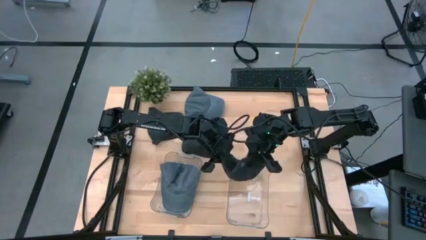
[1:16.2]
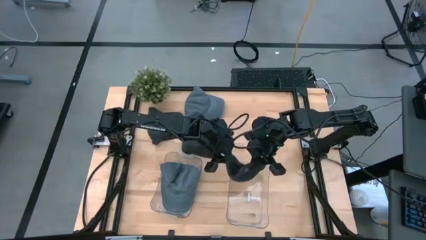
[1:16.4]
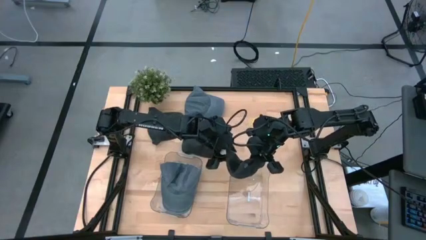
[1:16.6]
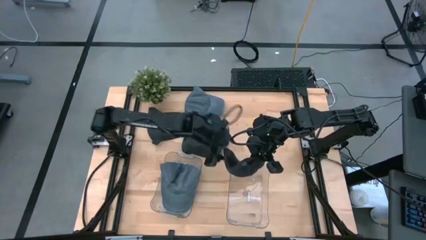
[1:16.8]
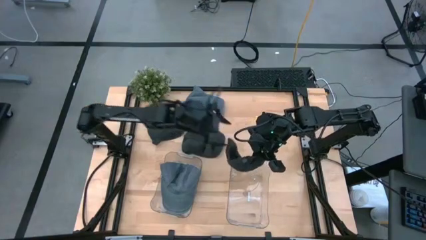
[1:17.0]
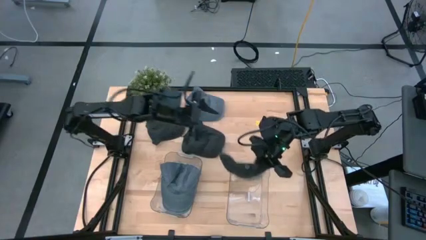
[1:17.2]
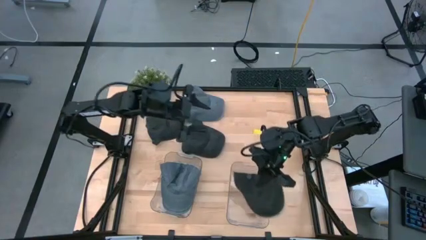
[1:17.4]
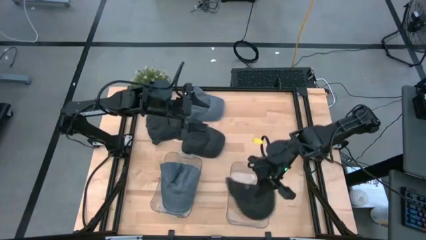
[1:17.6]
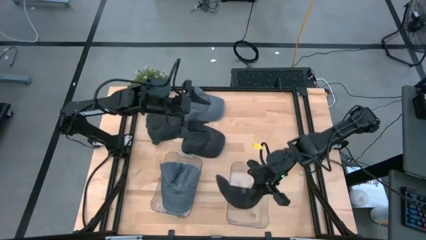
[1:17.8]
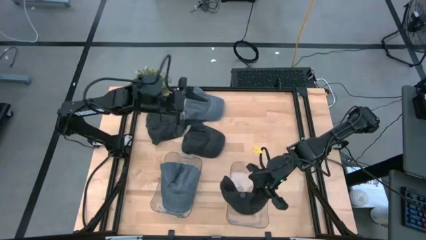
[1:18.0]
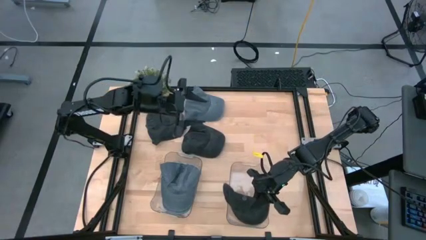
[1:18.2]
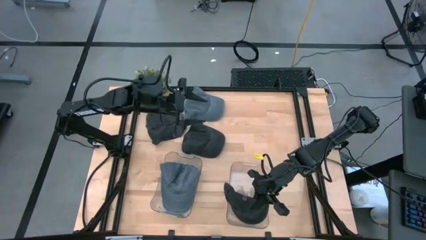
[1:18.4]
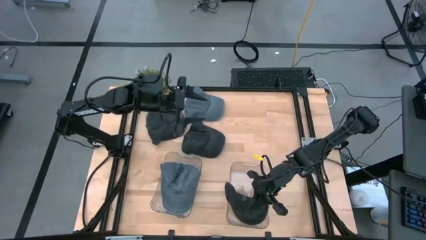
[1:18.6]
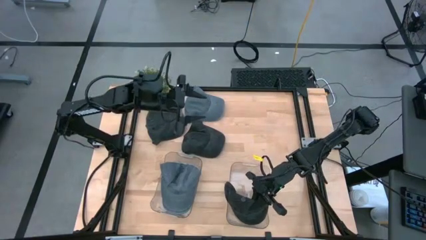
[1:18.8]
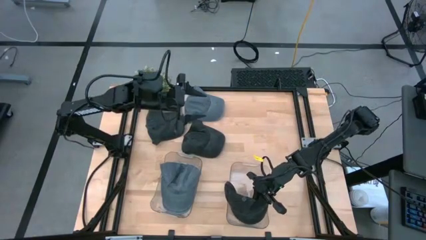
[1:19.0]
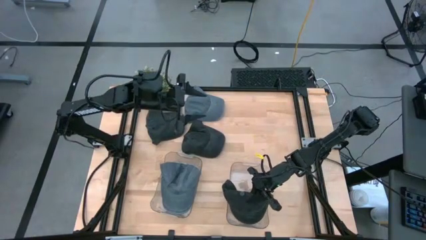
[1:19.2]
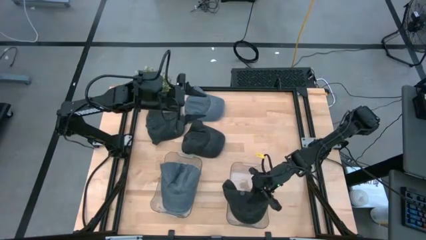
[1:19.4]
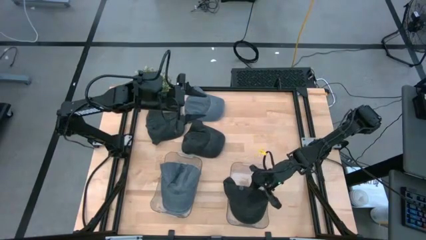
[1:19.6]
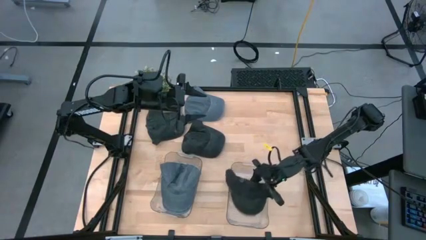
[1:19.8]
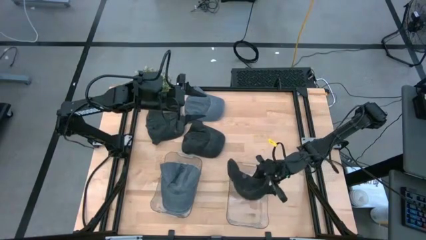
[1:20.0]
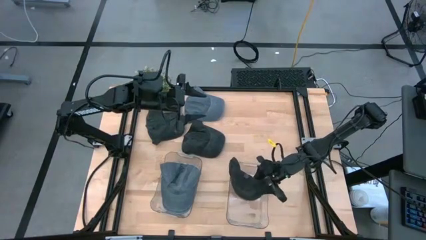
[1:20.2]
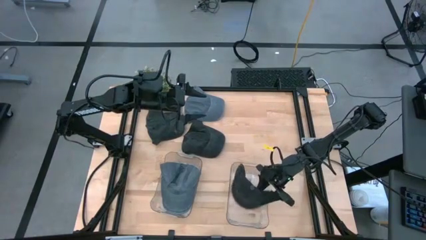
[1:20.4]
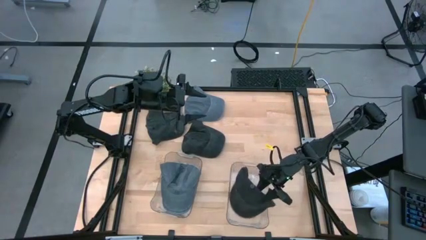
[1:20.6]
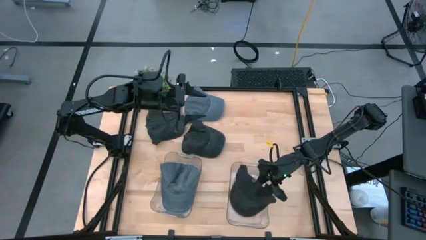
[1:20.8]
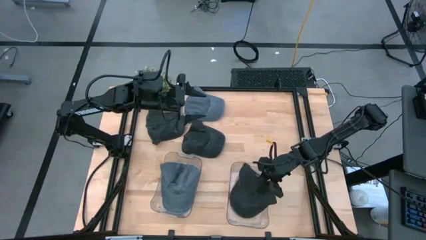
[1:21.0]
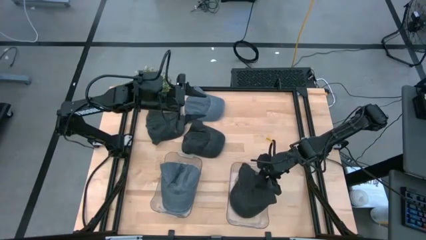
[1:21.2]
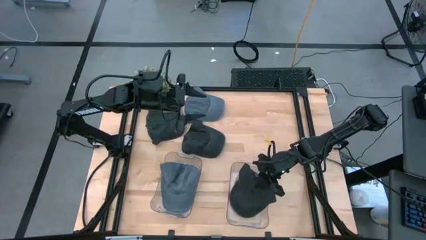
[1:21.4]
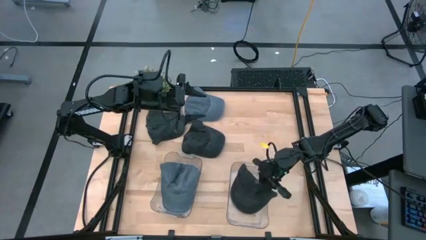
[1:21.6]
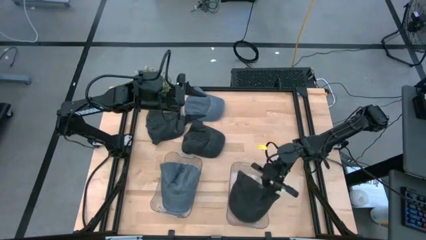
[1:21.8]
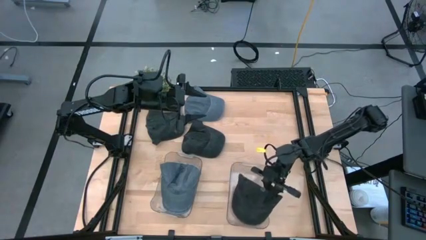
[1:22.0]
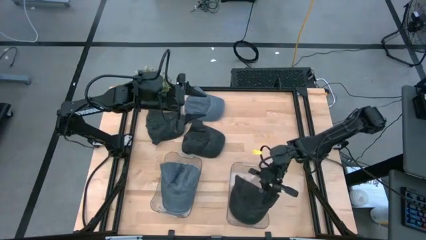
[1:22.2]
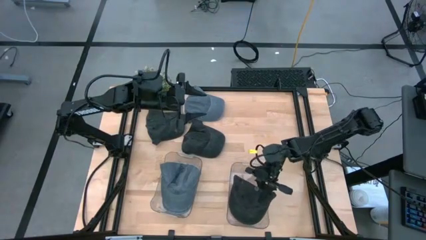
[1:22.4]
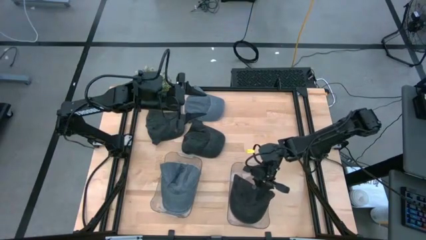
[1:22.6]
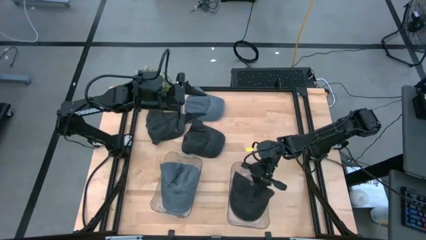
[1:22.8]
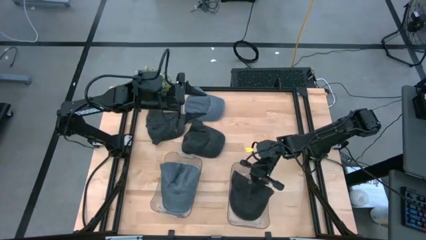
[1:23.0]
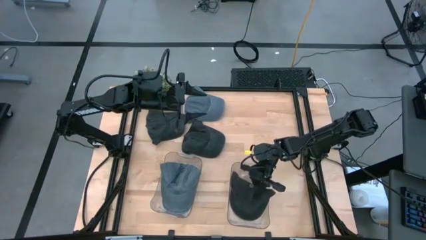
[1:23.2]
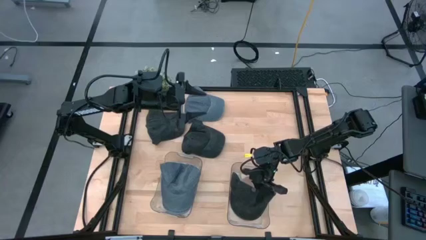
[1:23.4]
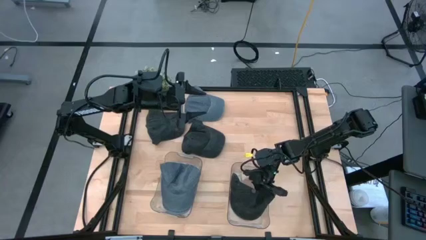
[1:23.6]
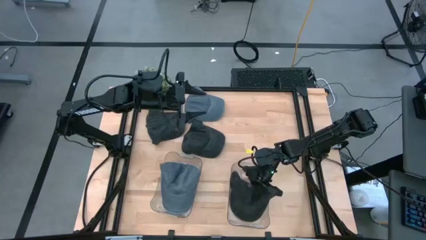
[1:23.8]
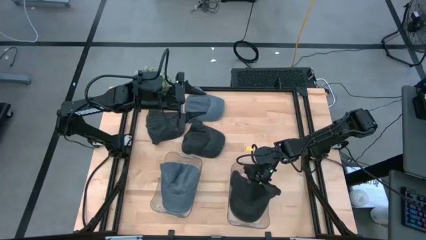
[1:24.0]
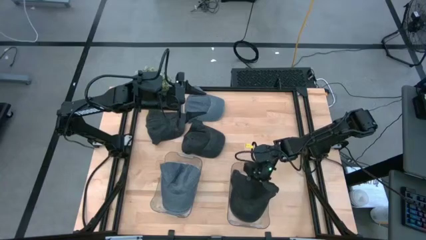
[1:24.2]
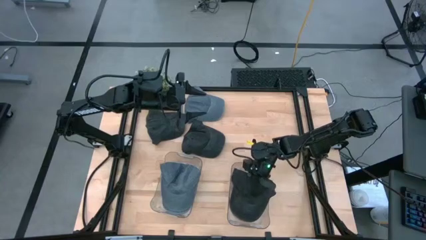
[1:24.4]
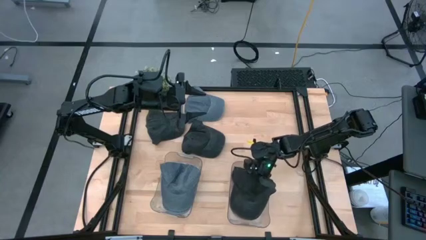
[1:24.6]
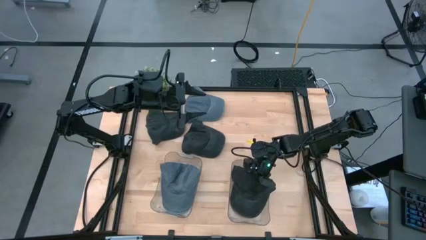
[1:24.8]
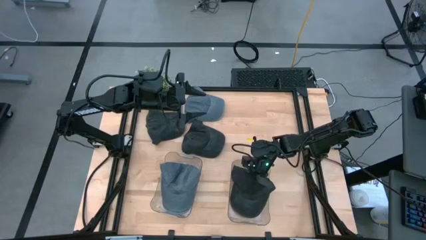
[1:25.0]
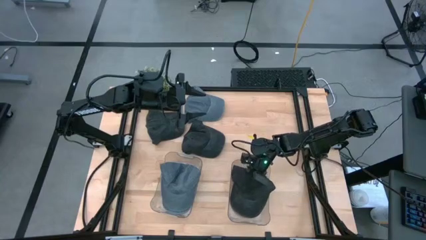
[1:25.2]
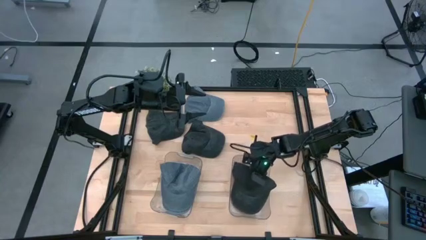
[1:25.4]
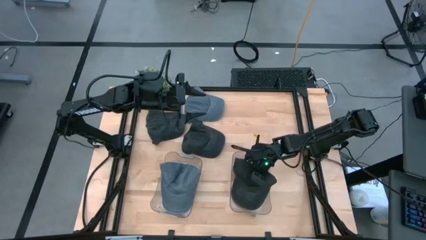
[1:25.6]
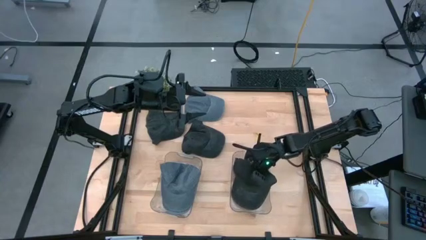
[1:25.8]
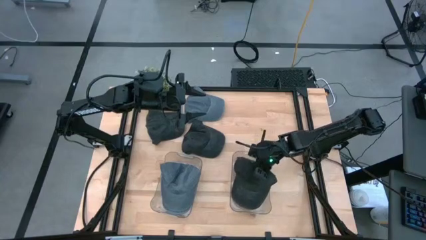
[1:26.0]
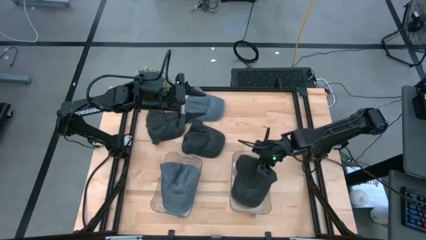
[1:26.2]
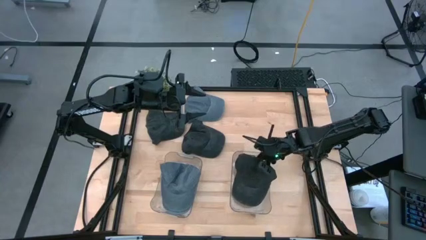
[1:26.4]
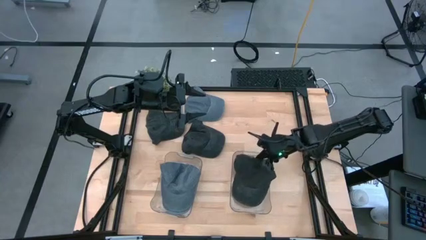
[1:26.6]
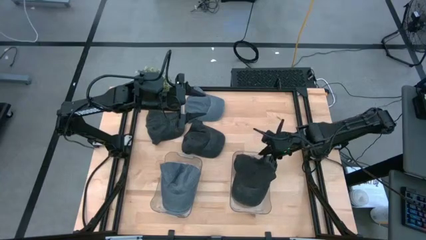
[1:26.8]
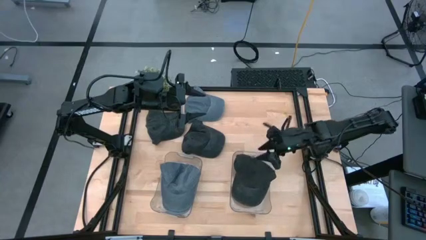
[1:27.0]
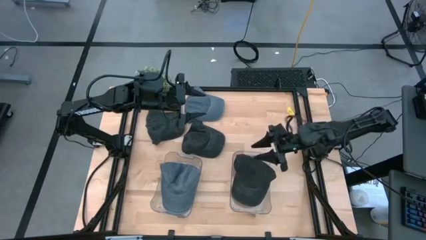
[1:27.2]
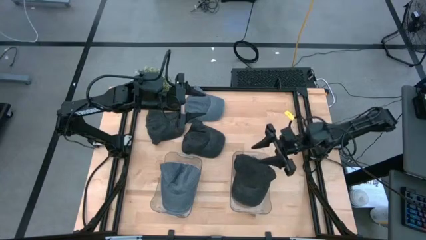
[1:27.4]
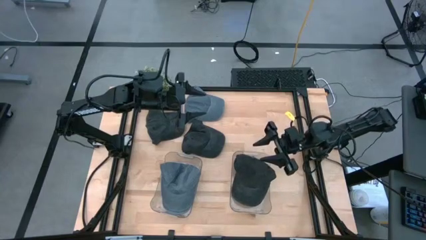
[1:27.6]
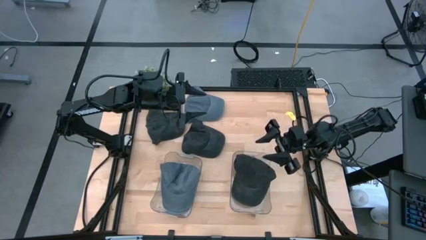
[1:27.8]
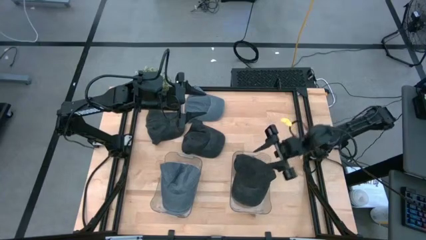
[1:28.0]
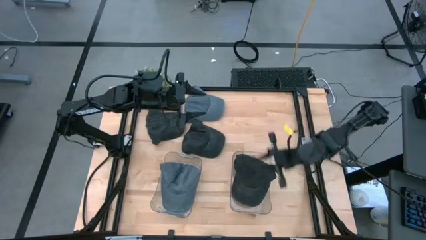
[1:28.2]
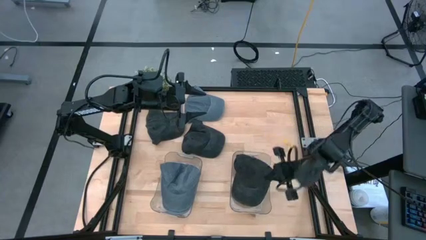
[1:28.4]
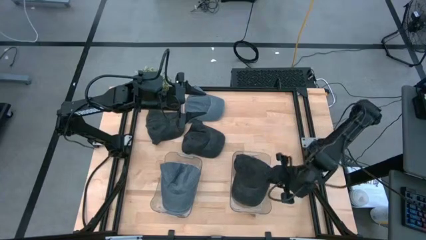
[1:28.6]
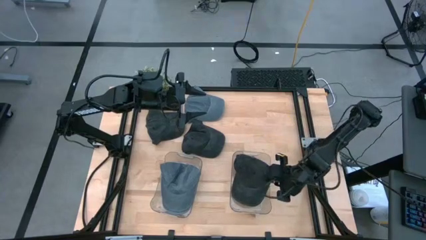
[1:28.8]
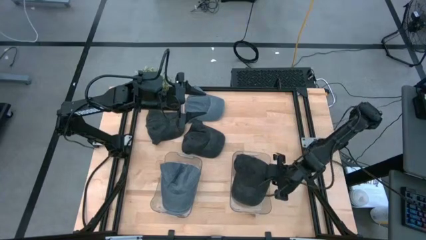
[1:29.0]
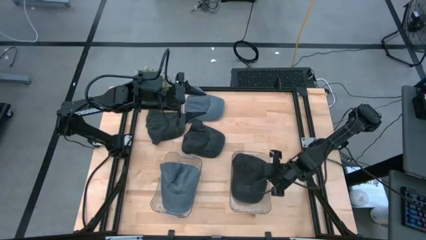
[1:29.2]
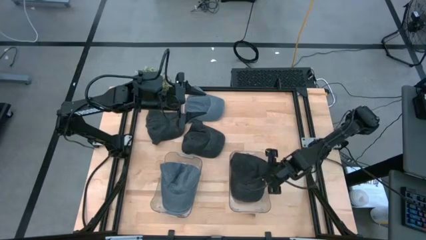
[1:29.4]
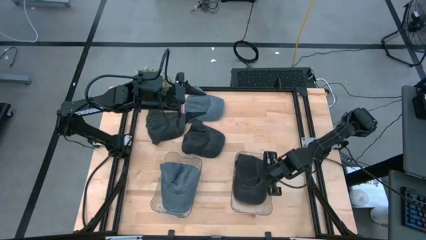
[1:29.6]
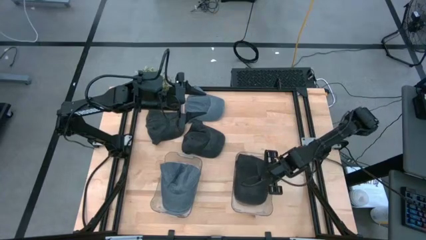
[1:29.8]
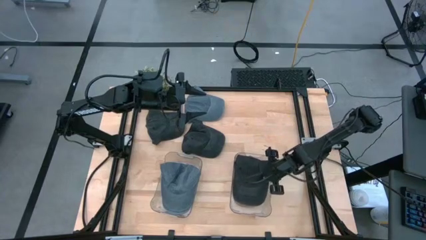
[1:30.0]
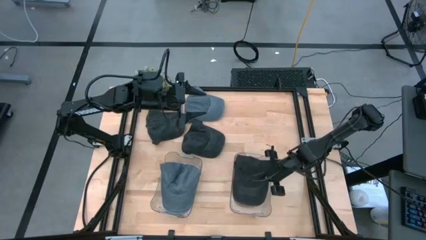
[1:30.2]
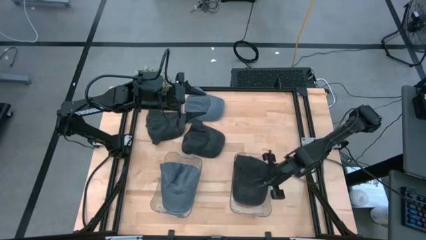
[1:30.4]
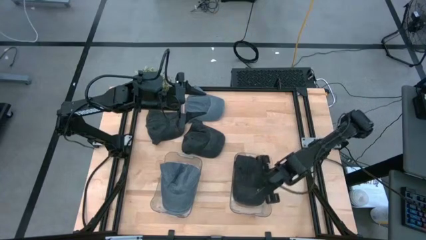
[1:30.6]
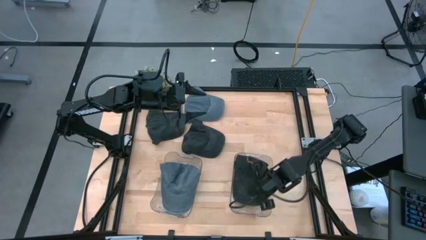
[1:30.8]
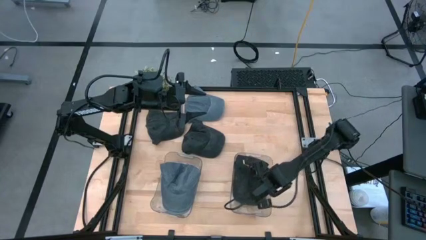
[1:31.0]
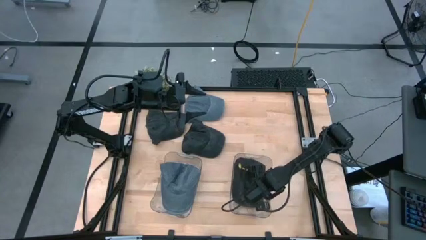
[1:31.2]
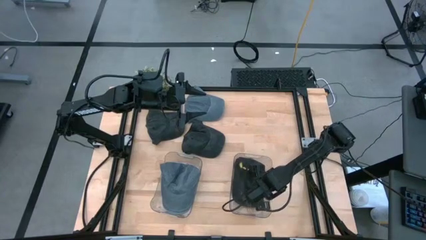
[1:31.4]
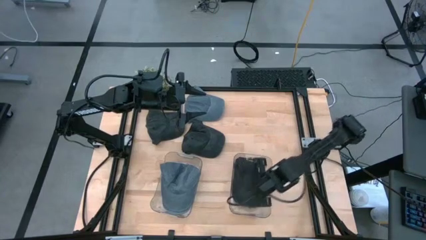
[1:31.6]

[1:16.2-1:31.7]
Task: Pick & Place hat
Put the top right black cap into the right transparent bin
